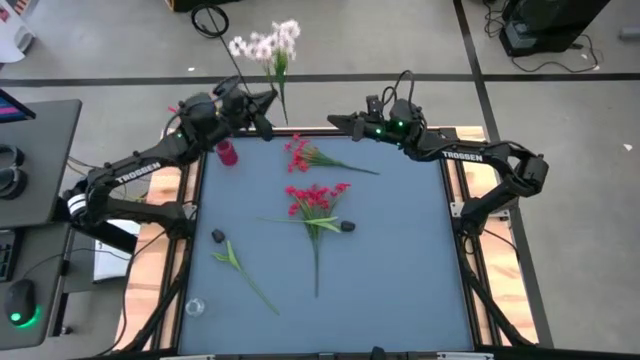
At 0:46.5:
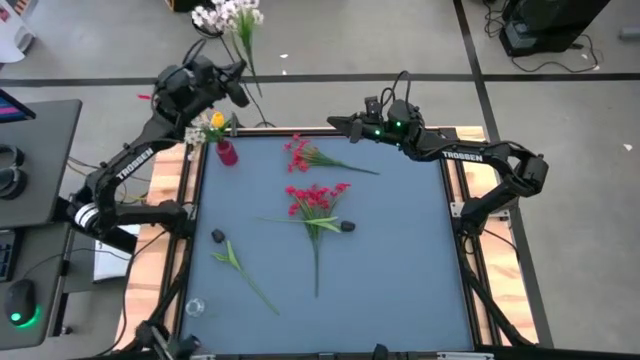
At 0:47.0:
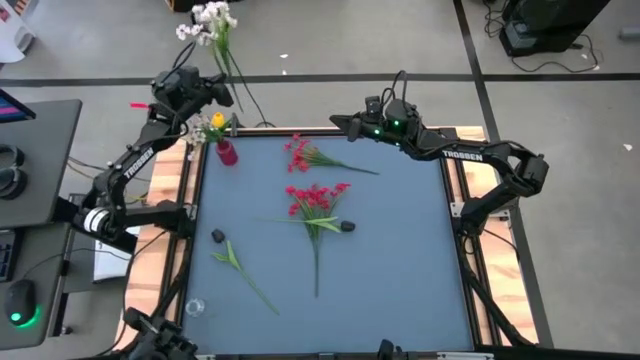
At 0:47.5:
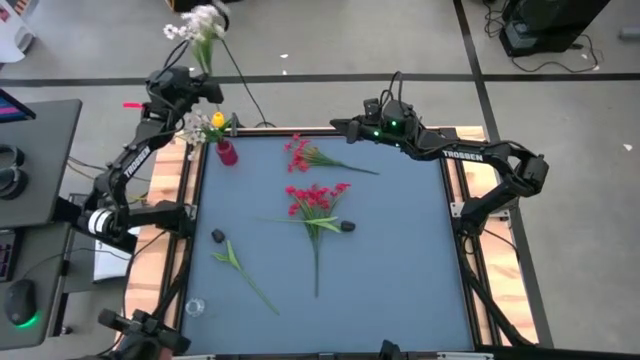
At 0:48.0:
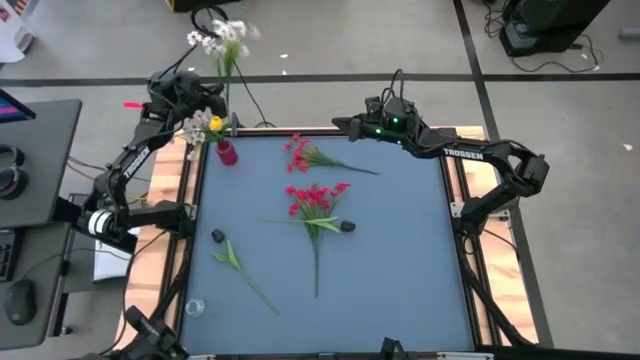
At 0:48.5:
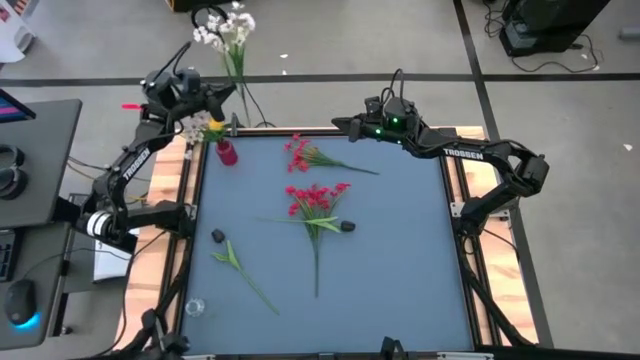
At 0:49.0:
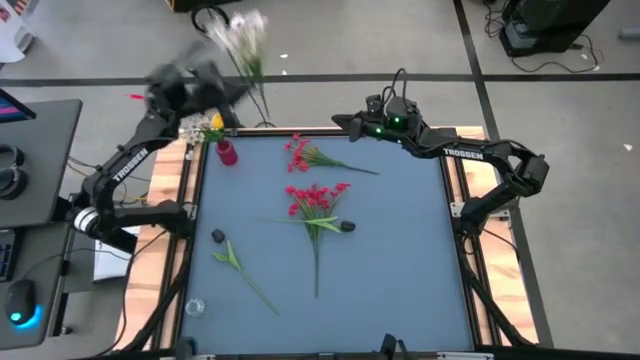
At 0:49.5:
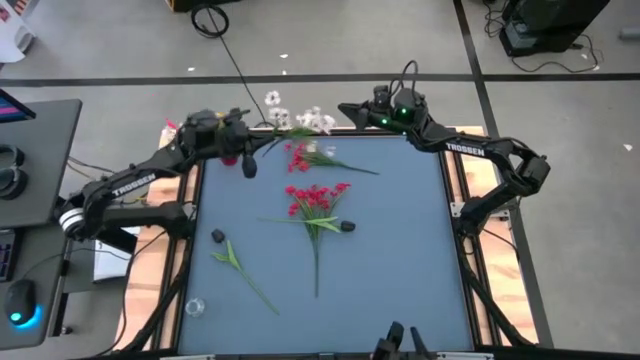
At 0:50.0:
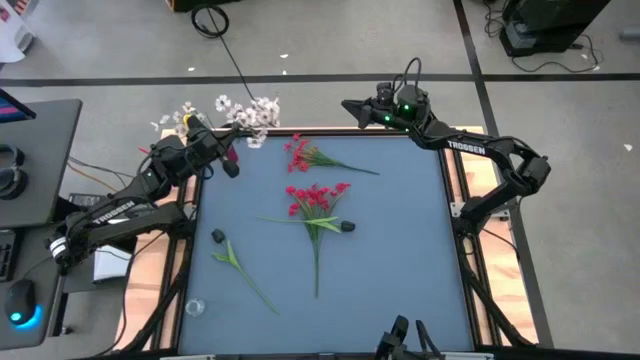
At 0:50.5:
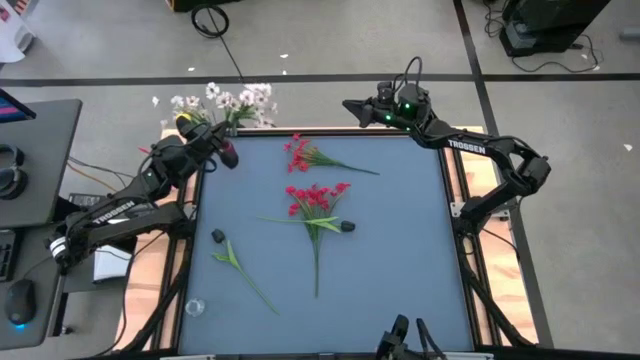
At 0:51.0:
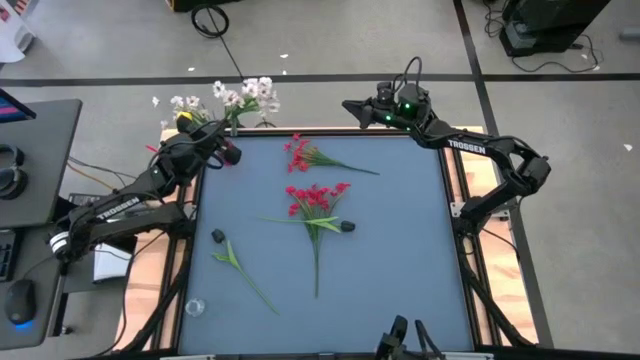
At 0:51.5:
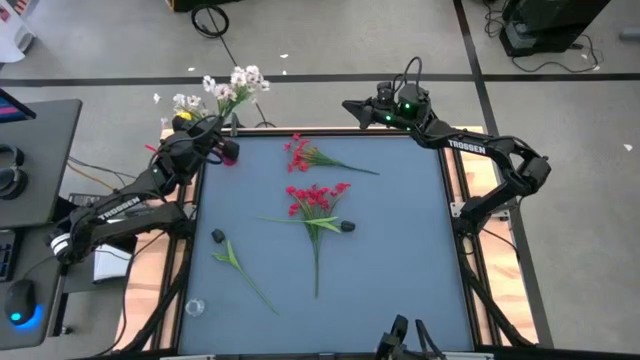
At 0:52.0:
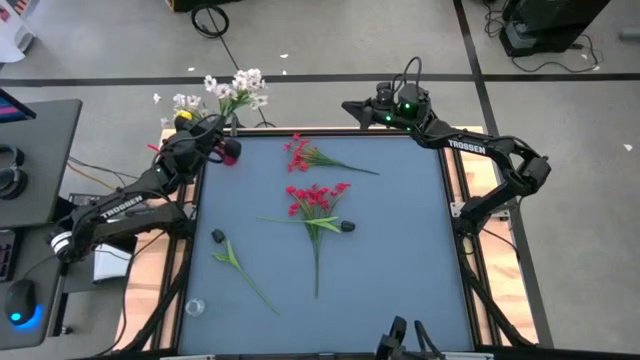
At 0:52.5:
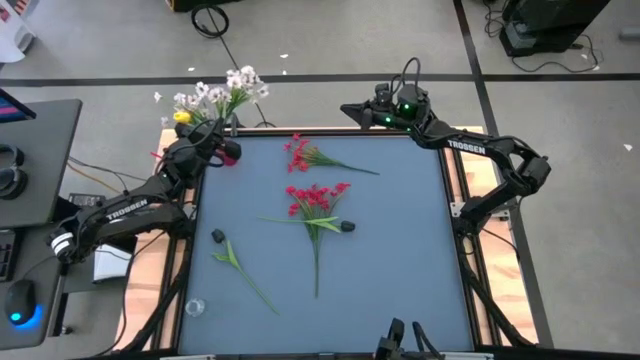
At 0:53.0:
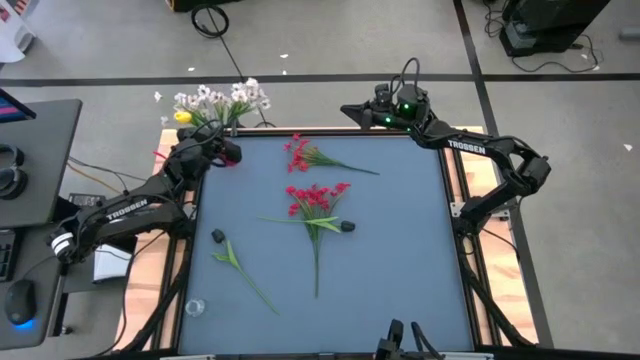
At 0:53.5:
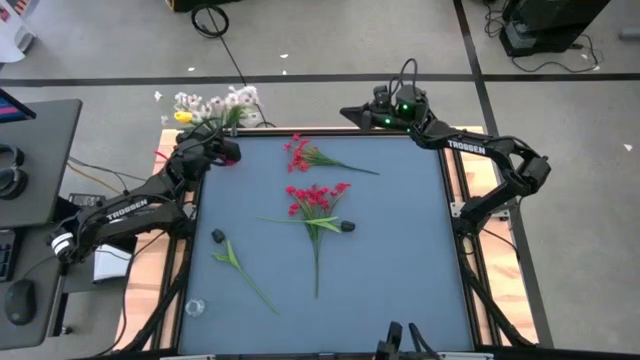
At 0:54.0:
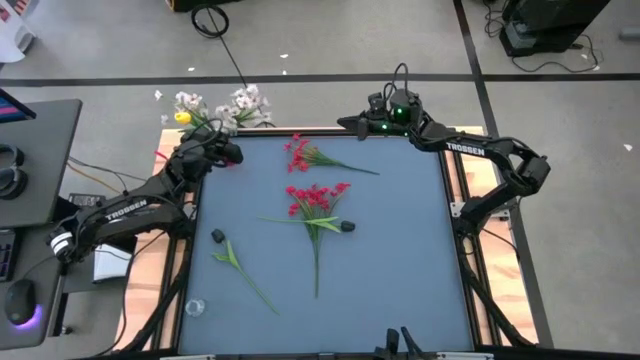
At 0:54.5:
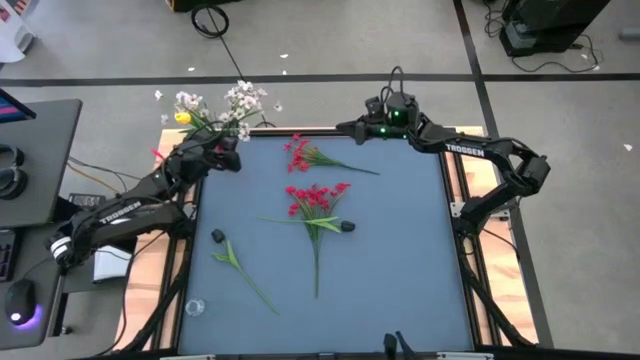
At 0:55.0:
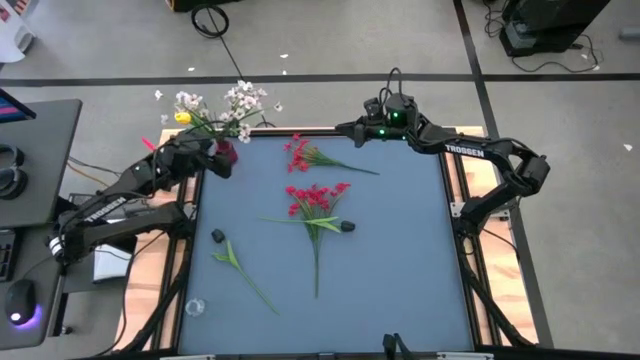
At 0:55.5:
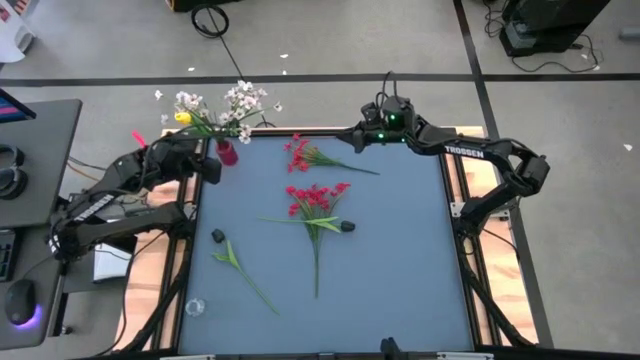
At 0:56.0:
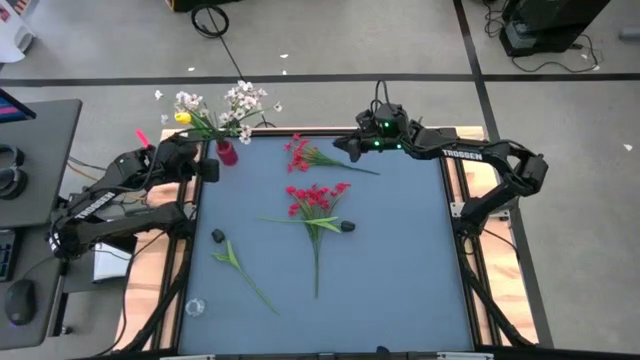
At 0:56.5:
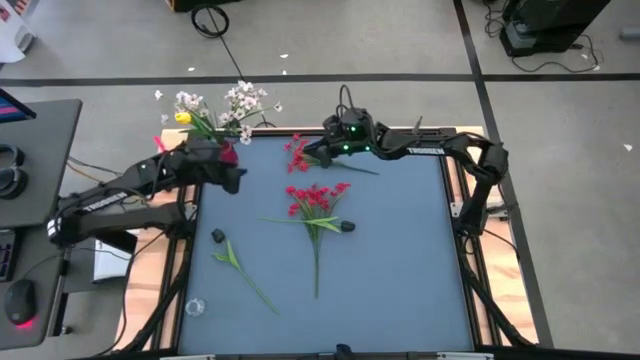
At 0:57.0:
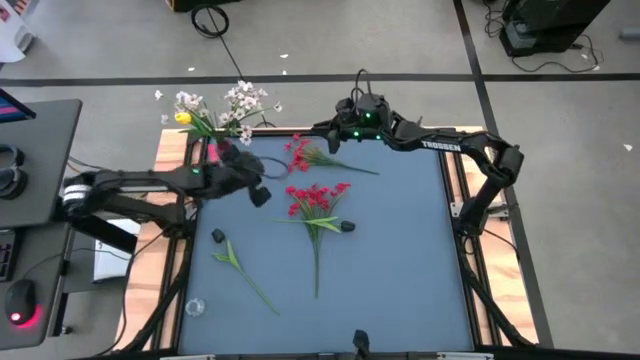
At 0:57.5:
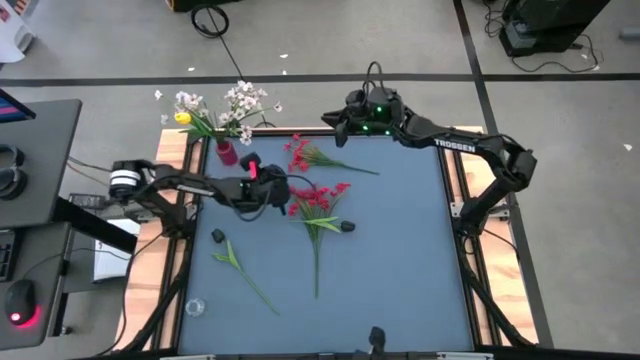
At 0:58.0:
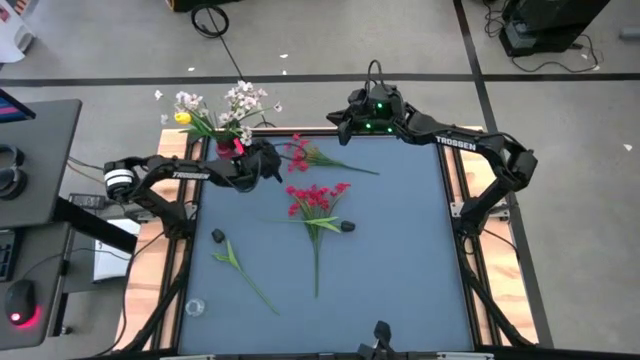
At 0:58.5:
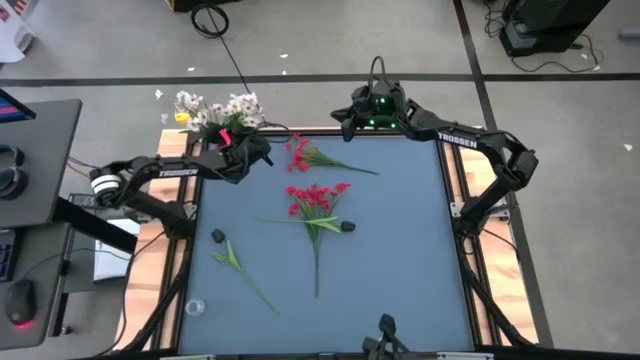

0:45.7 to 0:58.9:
Task: Sort flowers into vase by color
Put the white flowers into the red vase

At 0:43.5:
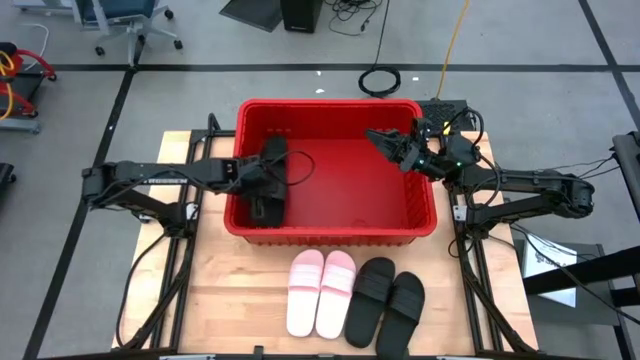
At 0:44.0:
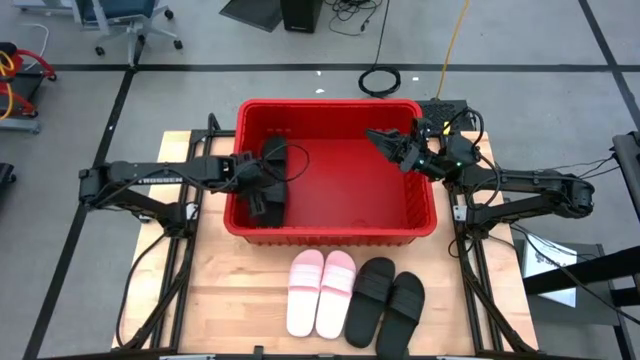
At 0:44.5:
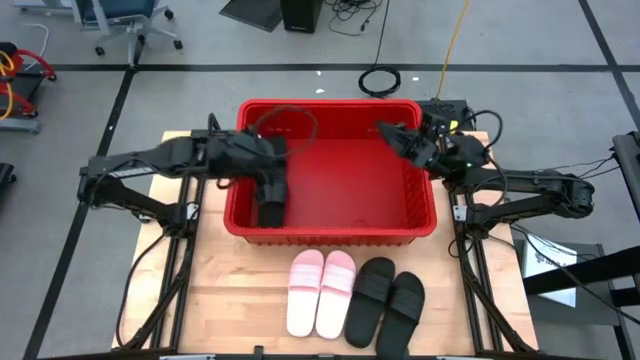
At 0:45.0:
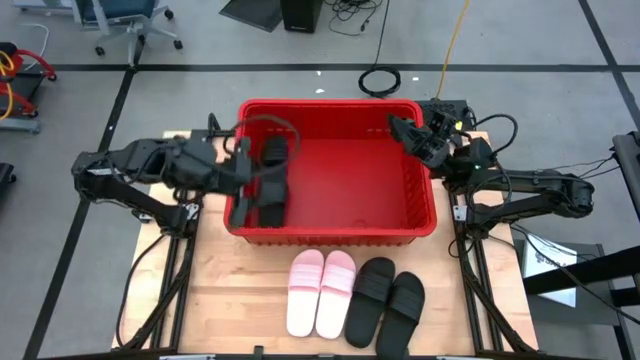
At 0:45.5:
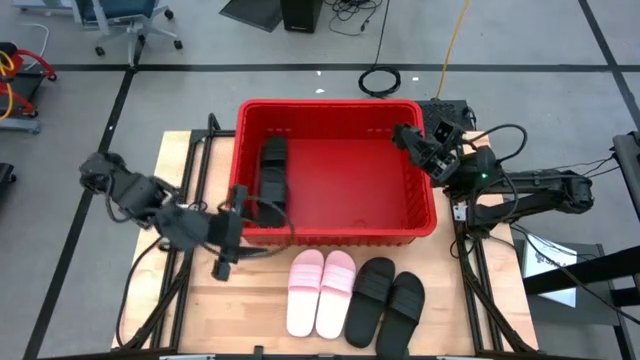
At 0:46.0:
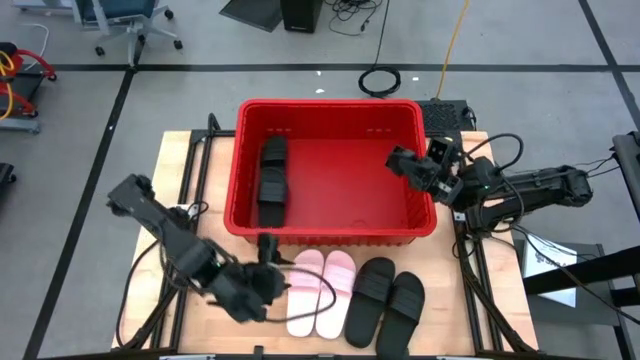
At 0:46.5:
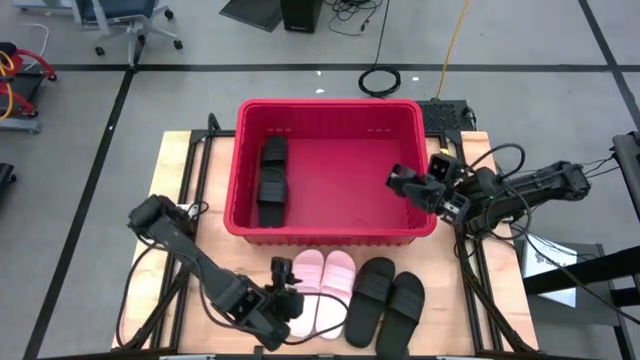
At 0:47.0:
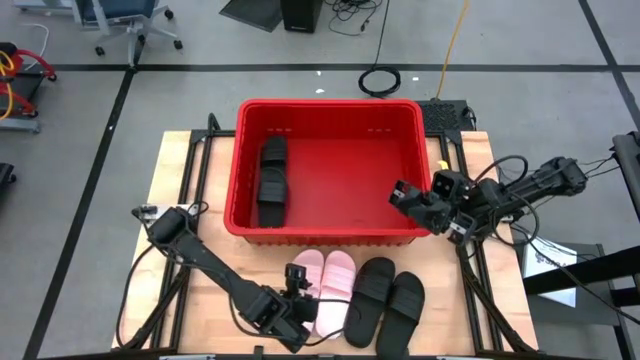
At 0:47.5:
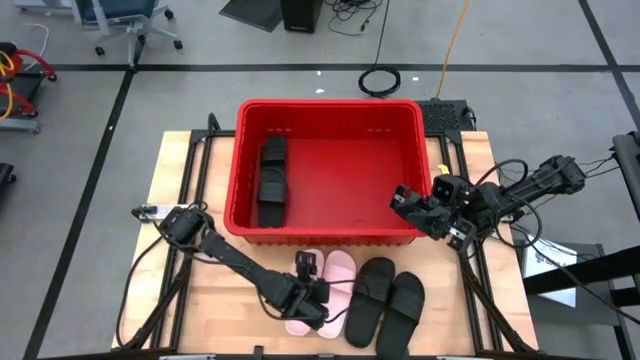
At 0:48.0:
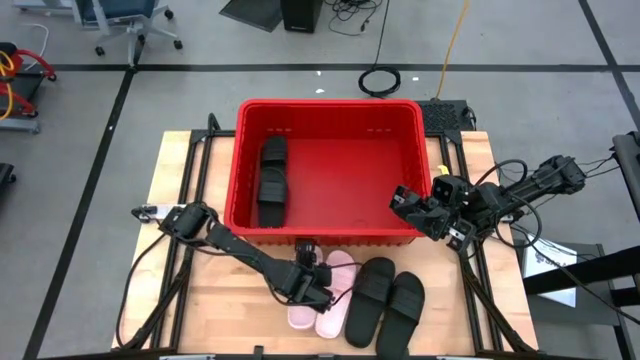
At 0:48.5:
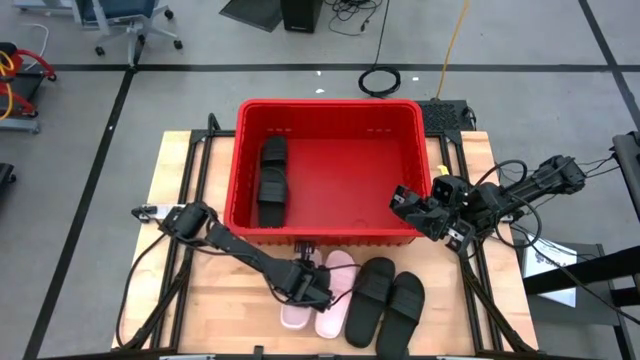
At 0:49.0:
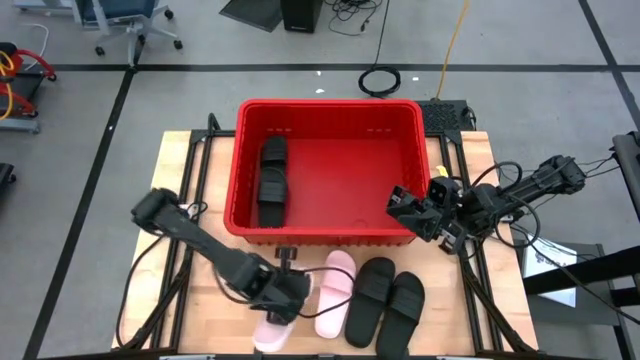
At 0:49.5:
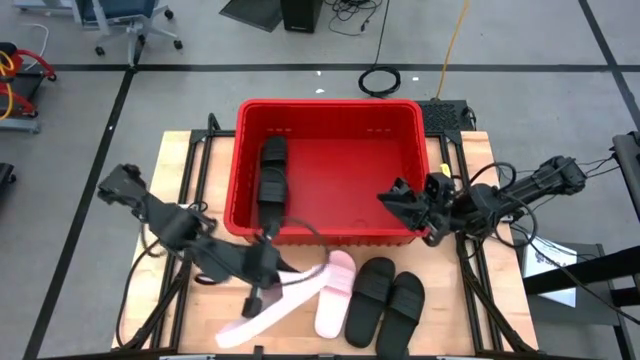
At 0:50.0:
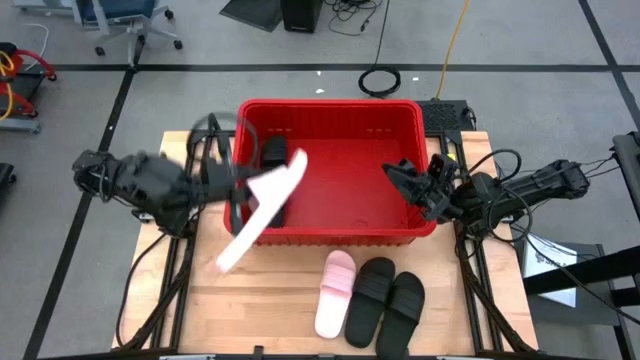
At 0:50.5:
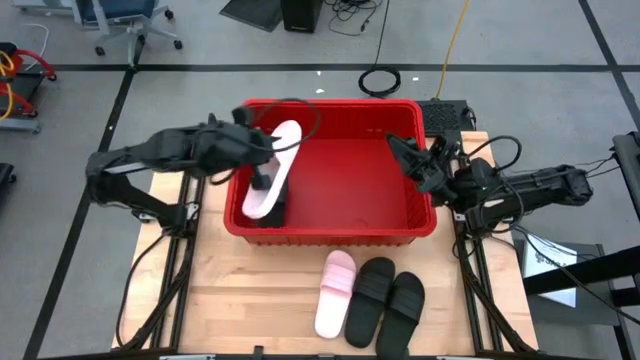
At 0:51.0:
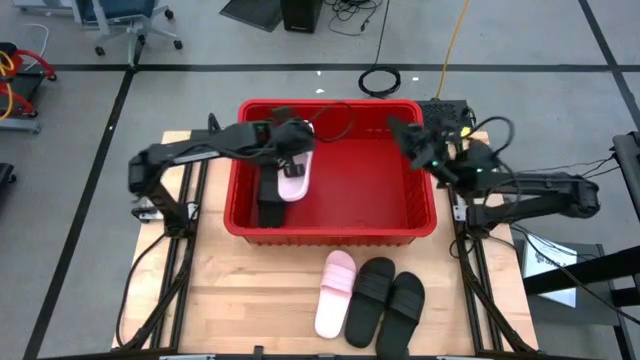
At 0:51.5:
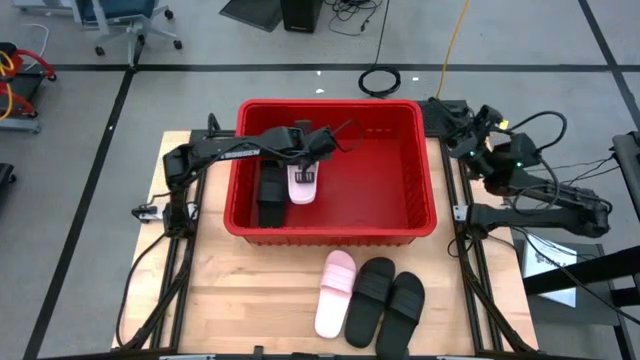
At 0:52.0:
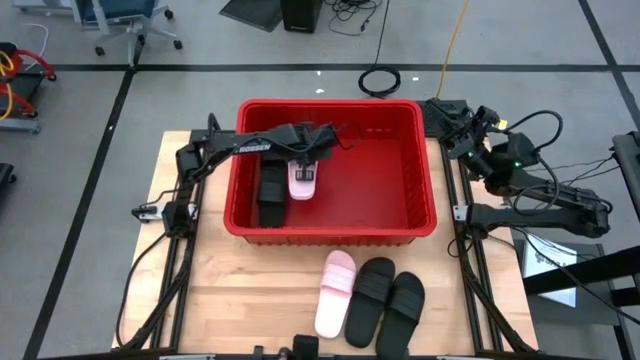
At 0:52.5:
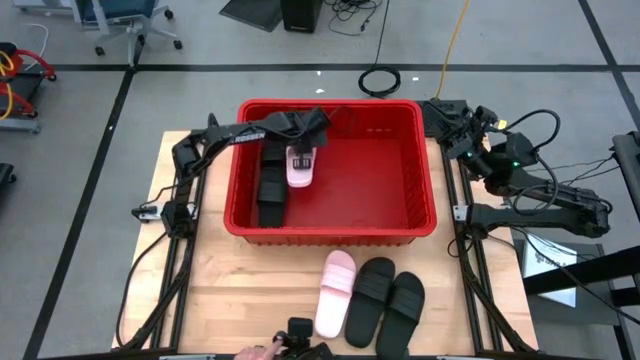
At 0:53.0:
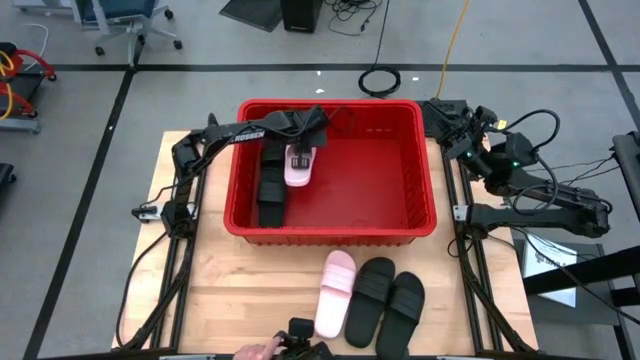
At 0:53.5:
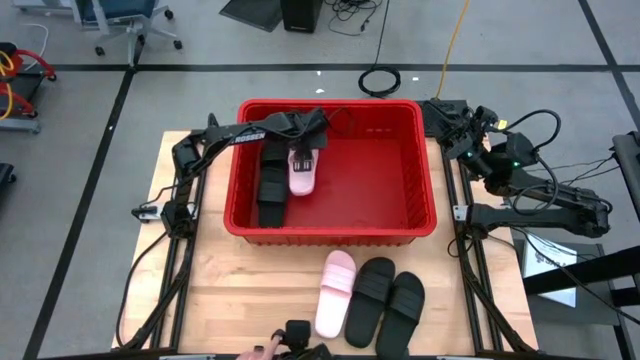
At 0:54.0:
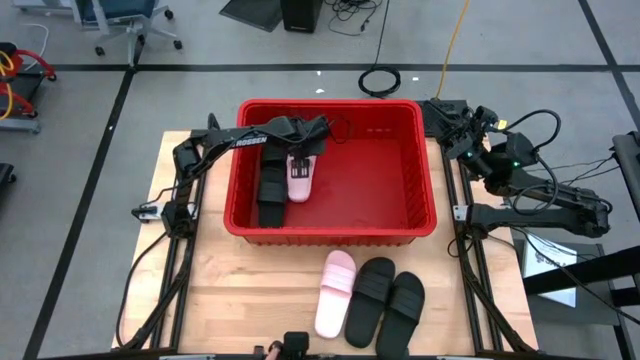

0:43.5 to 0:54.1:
Task: Pick and place slides into bin
Put the pink slide into the red bin
